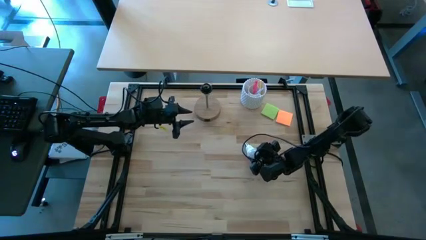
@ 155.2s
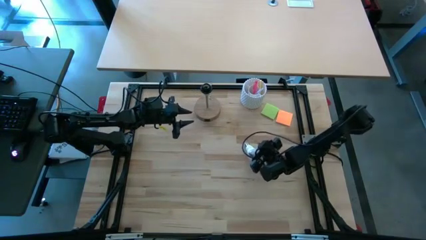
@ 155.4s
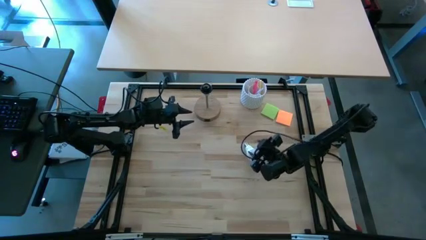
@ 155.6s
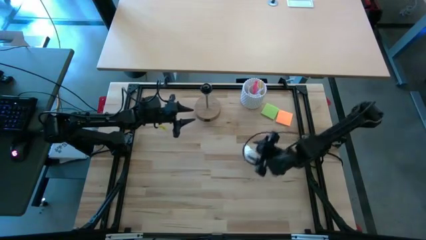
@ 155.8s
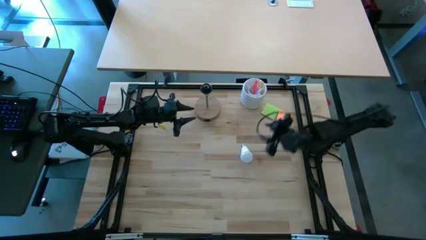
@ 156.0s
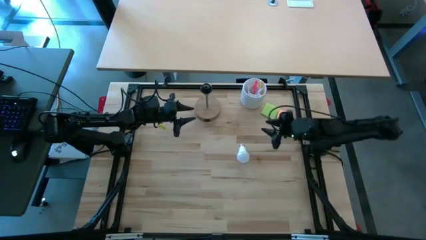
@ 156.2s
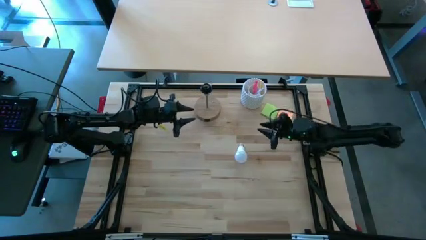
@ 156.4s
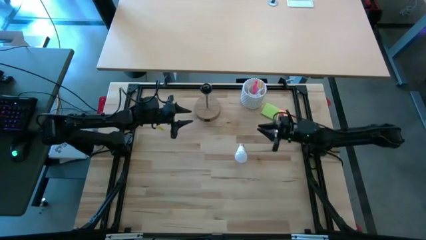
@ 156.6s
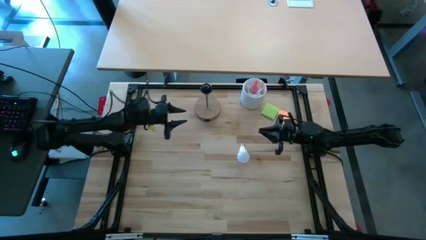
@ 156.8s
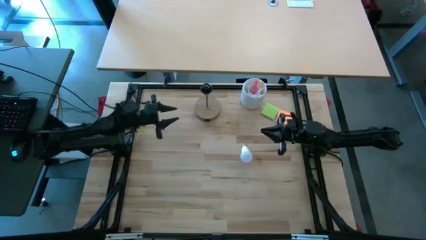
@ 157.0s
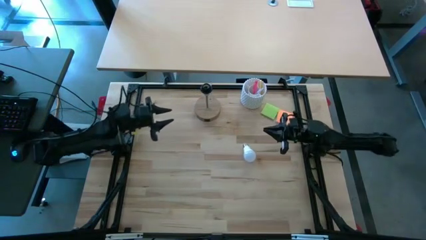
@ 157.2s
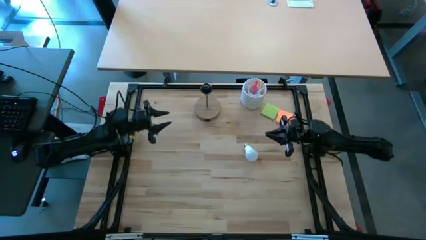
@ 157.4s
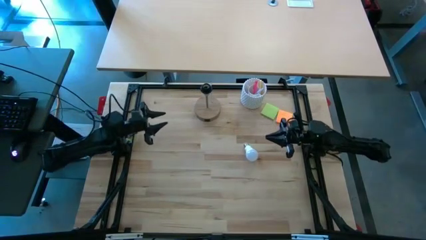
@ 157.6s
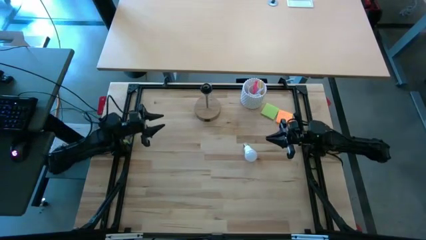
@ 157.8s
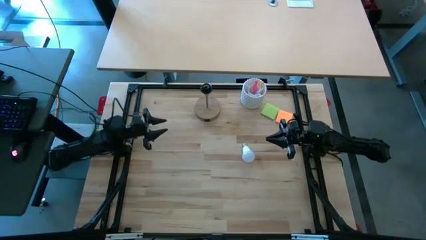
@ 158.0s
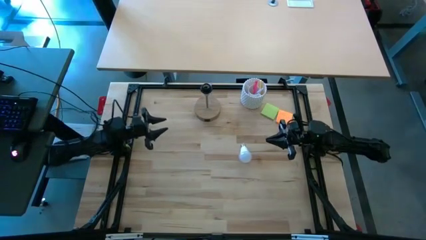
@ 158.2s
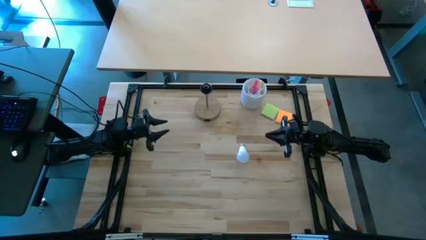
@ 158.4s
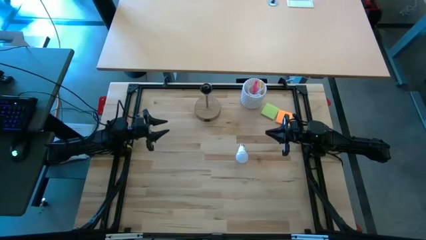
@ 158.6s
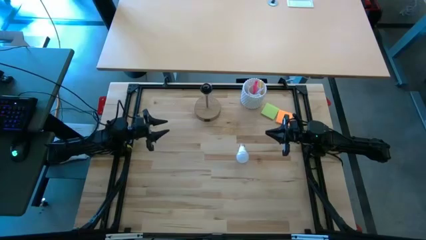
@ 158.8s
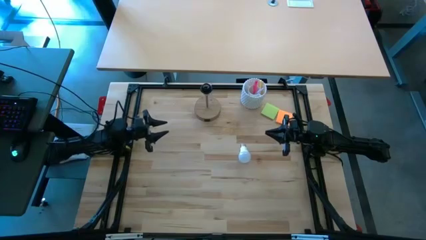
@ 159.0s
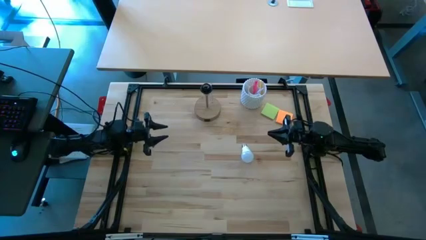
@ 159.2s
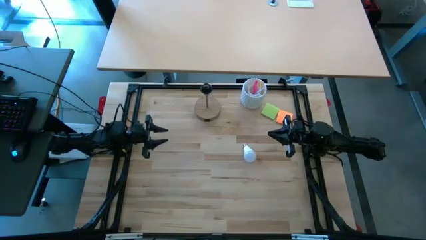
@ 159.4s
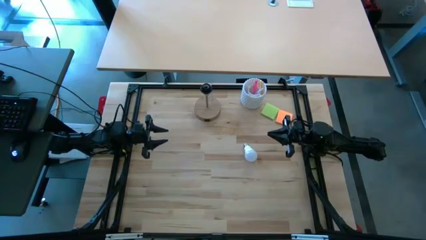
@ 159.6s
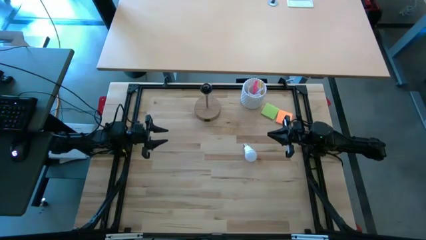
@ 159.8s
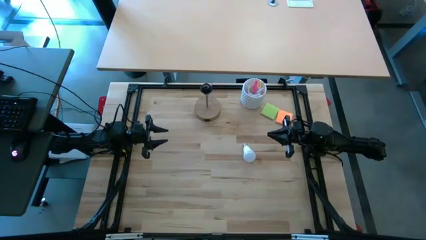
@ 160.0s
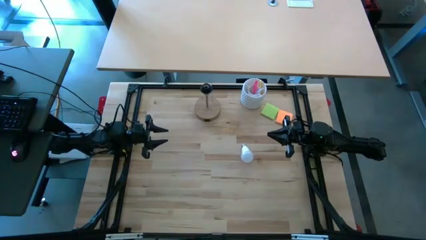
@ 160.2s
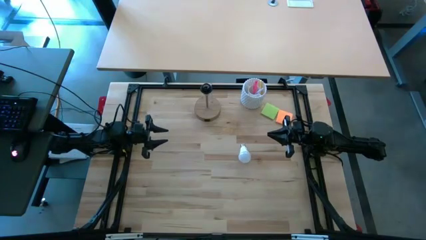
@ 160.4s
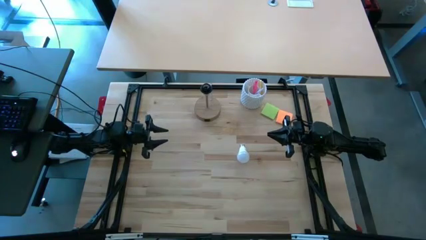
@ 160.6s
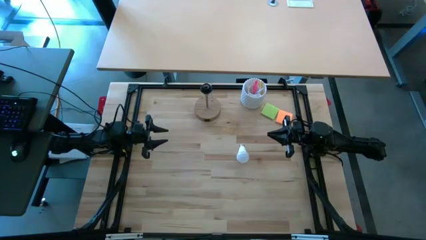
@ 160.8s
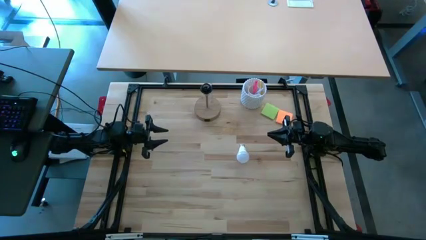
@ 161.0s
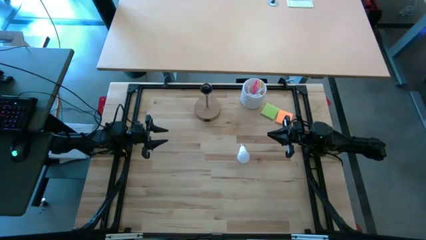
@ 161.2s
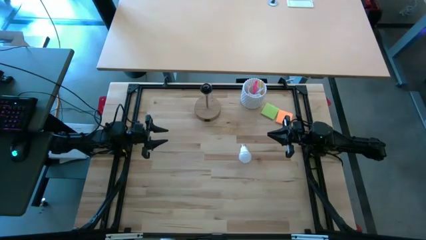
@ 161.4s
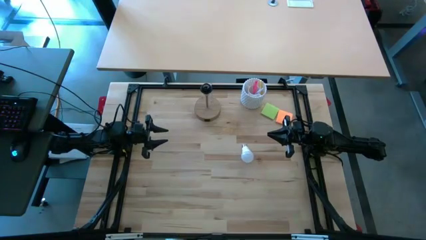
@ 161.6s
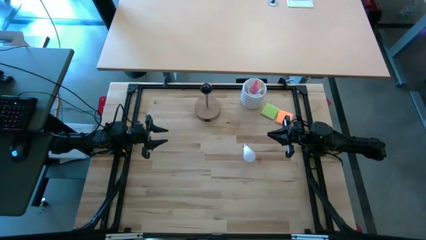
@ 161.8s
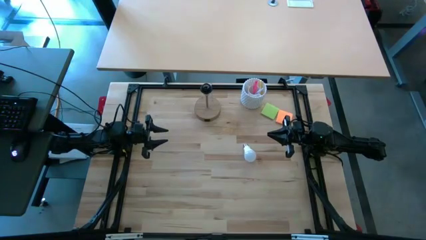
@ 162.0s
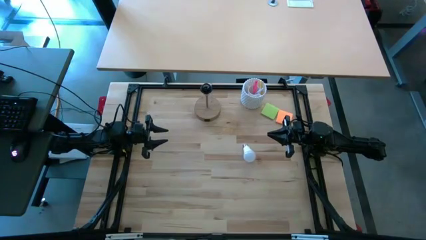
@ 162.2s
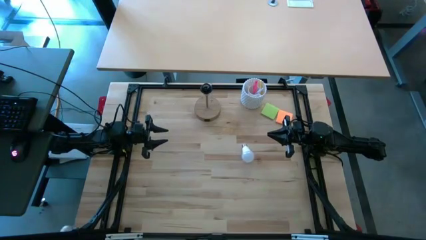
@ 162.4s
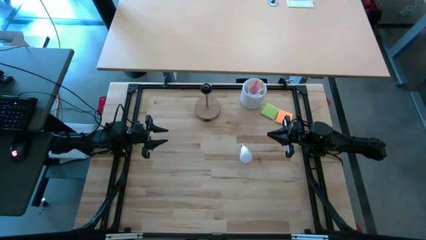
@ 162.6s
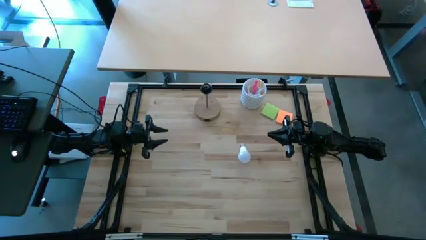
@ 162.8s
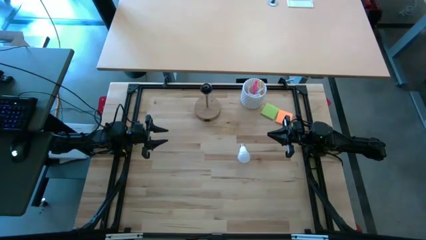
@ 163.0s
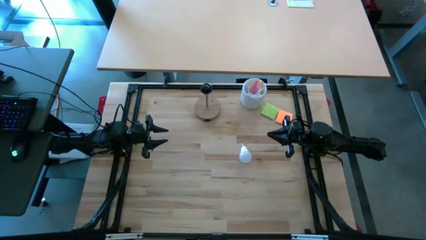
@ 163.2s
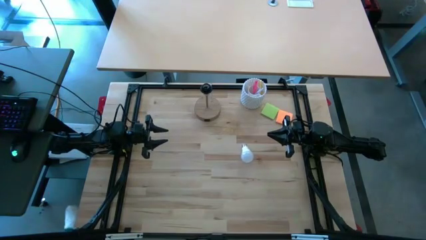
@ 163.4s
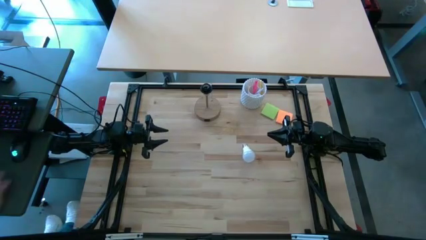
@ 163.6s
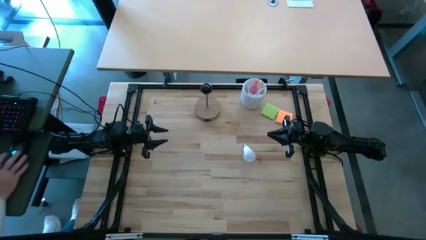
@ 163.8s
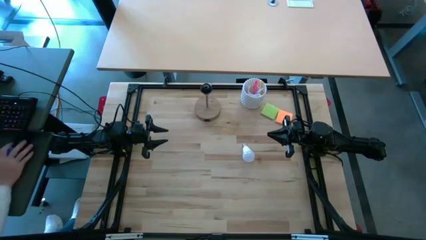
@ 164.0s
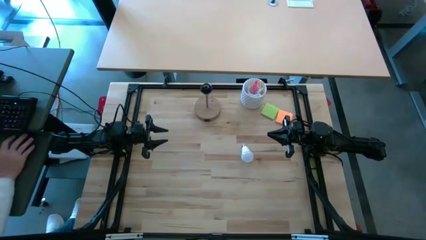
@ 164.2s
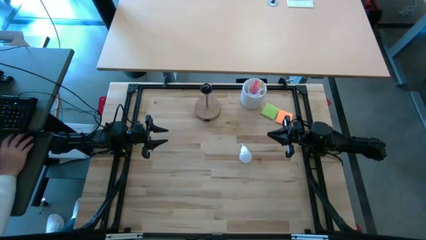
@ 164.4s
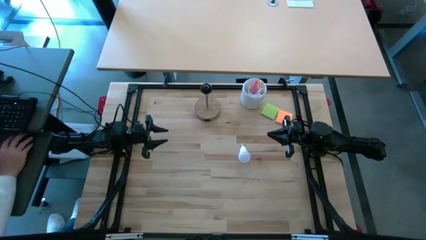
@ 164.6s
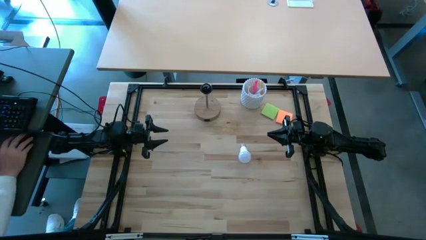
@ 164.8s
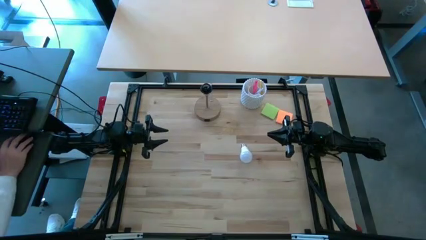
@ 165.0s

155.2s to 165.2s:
Task: Screw lightbulb
Return to Home Position

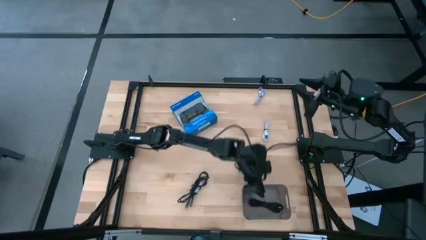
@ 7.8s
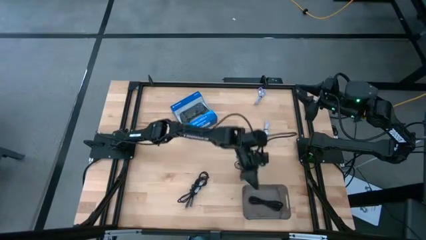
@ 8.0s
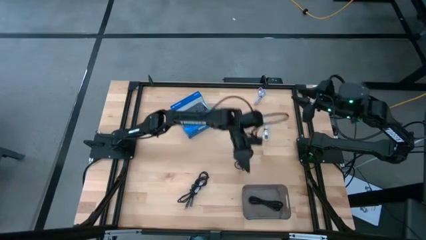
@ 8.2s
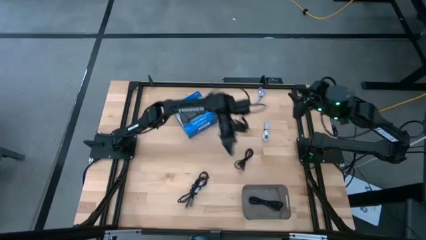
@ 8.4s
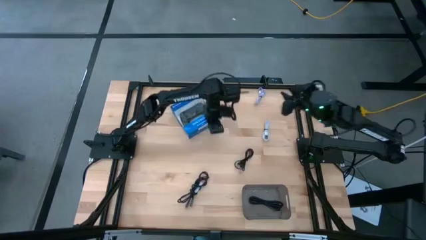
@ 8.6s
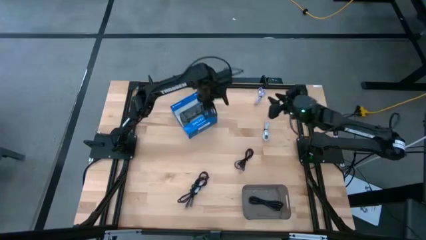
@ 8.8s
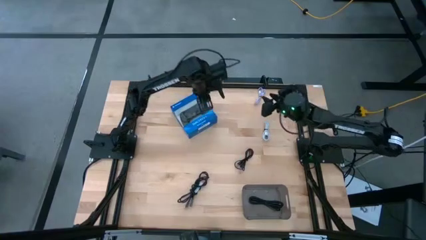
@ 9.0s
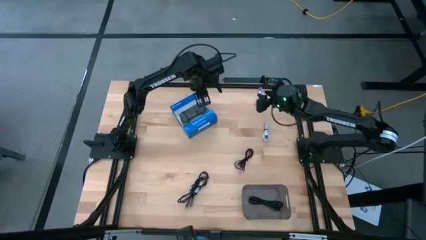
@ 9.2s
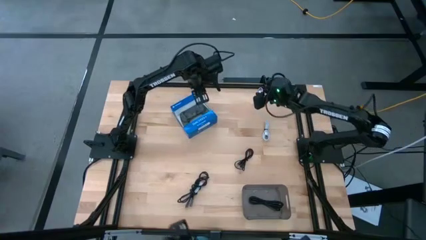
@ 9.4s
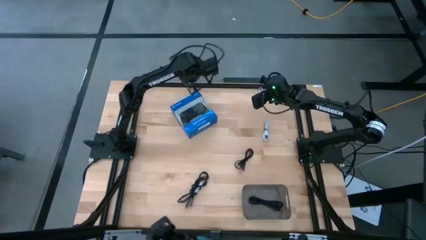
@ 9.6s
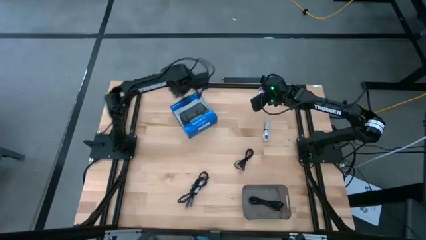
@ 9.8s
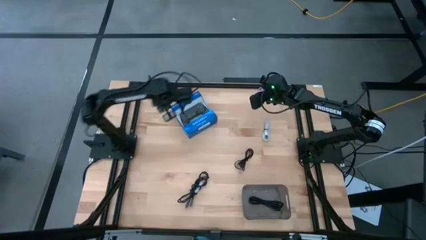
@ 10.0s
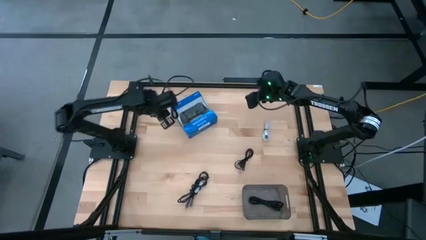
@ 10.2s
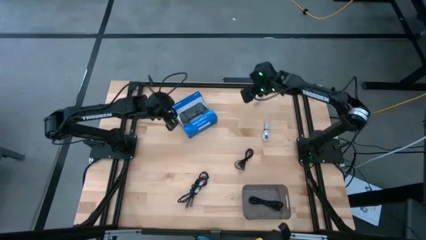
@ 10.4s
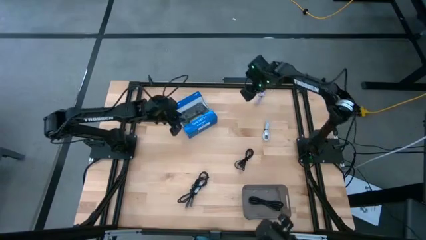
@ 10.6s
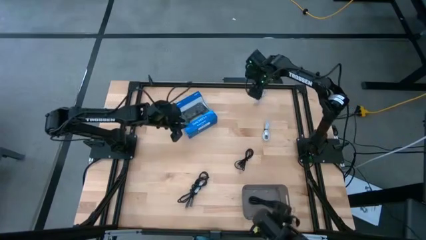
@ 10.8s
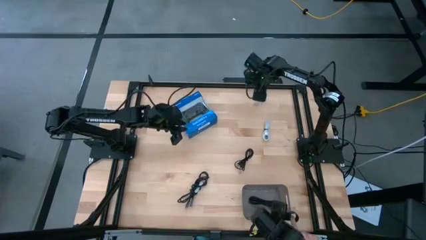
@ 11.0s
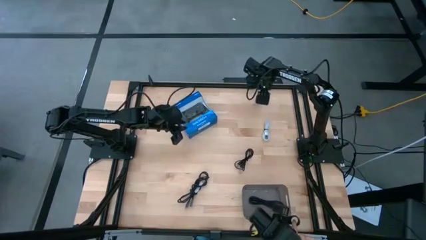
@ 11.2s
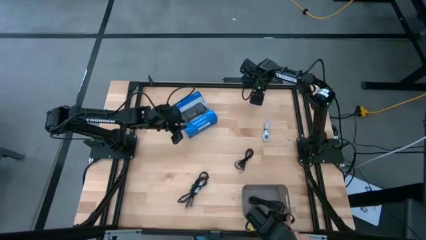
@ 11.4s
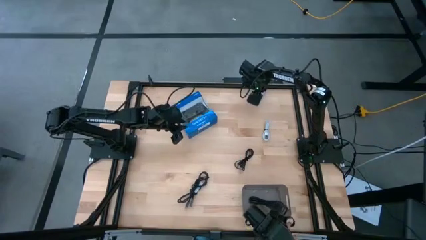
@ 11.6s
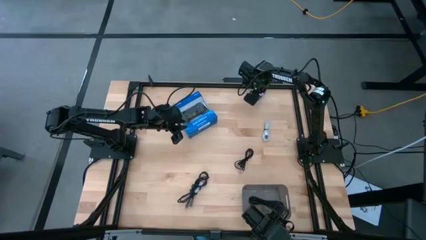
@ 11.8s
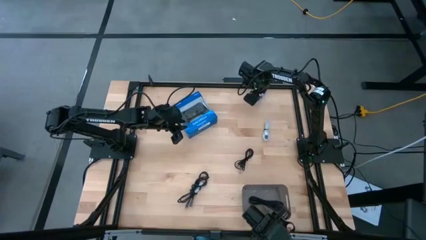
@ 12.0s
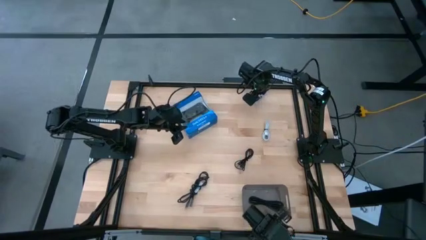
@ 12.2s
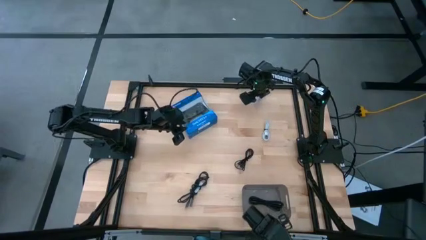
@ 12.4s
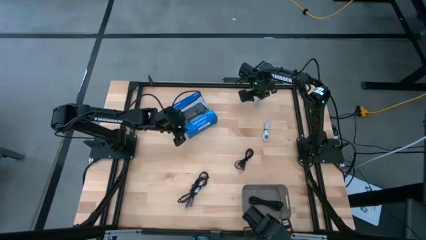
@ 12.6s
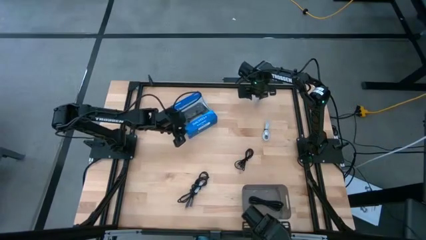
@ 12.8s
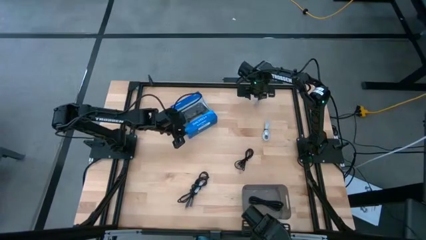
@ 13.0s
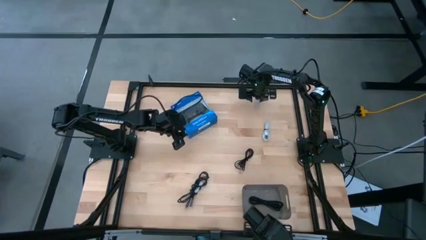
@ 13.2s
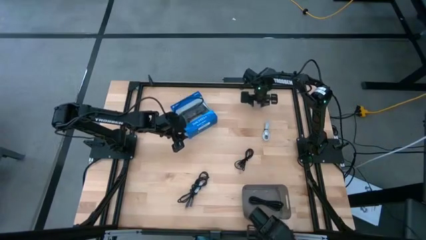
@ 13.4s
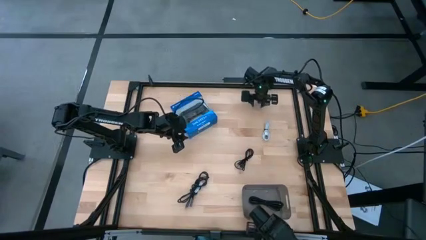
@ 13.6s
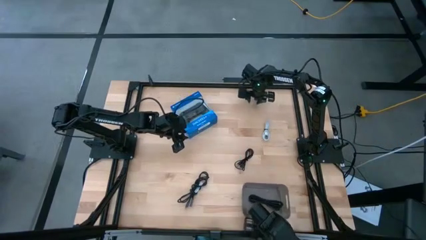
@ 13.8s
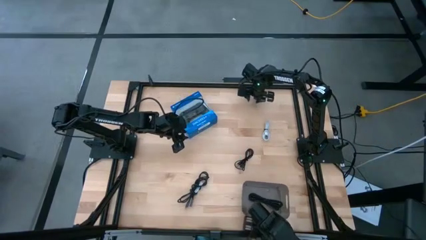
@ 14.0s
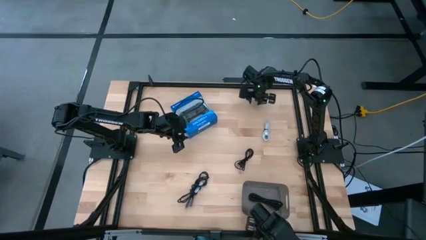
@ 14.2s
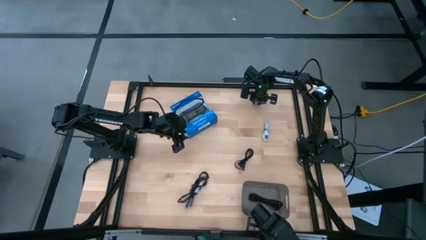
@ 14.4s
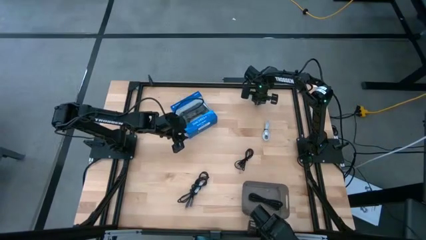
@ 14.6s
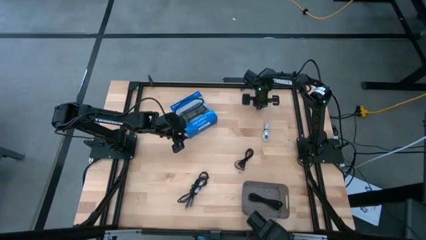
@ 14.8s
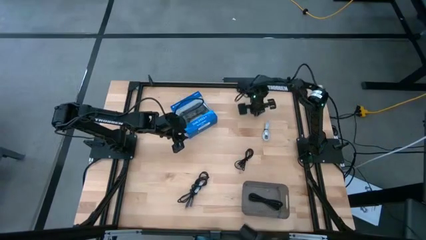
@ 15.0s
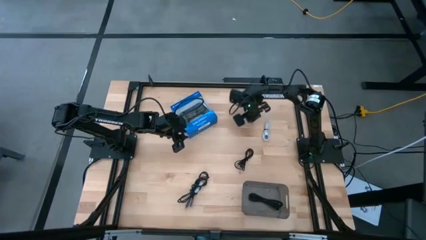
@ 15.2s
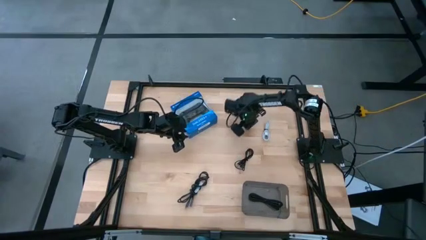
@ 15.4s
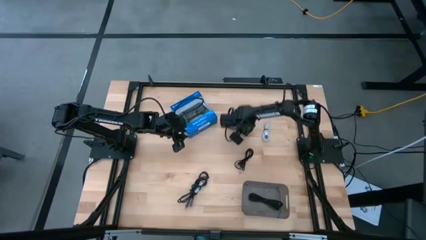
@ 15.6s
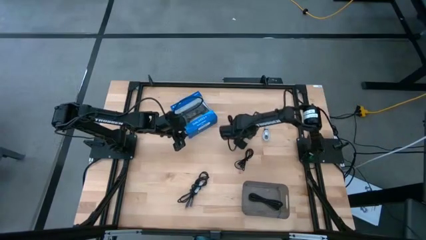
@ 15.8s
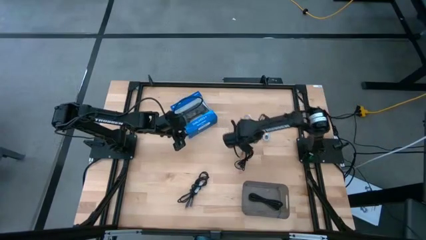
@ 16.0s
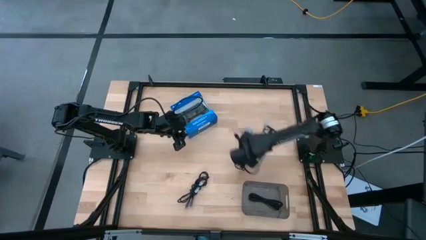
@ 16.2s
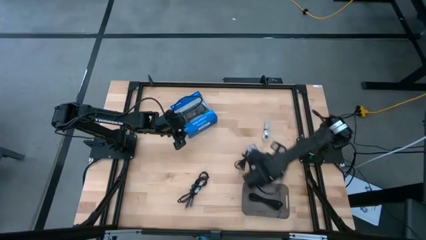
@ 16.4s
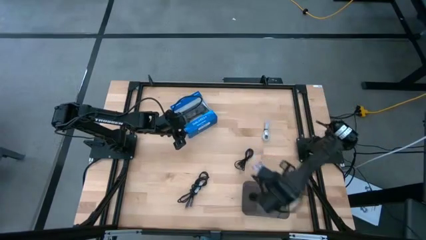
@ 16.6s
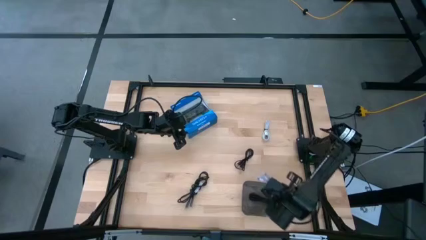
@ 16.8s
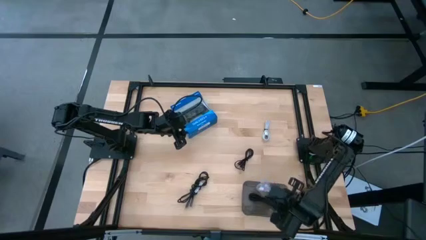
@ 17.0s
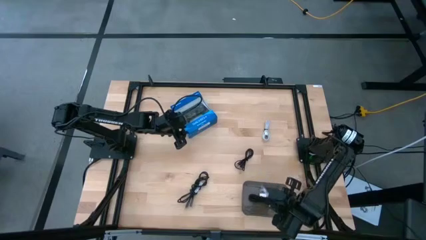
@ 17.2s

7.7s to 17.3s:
Task: Pick and place USB-C Cables
Put the light violet usb cable into the grey transparent bin
